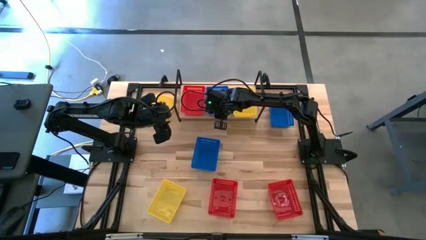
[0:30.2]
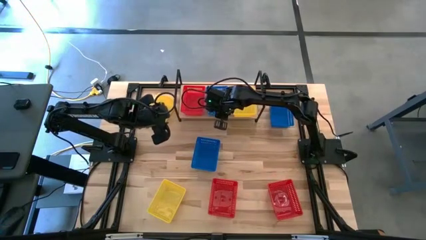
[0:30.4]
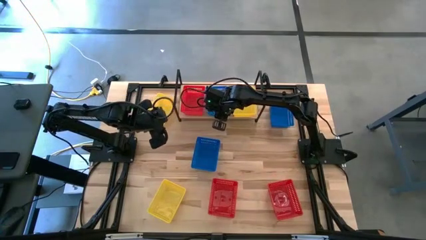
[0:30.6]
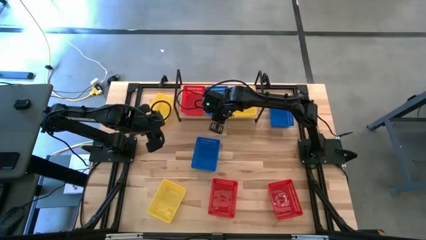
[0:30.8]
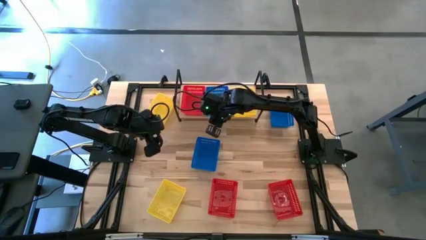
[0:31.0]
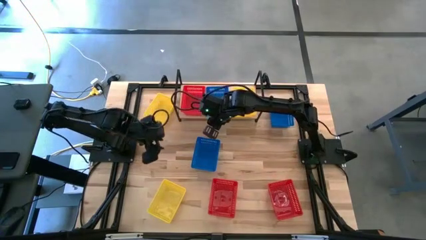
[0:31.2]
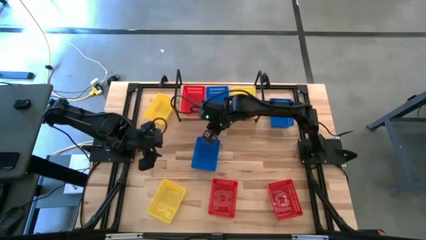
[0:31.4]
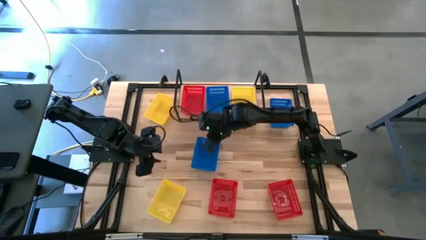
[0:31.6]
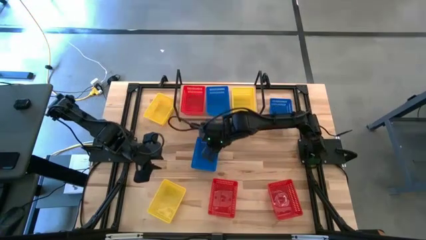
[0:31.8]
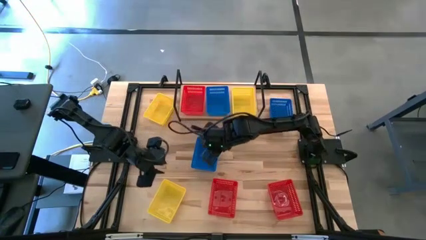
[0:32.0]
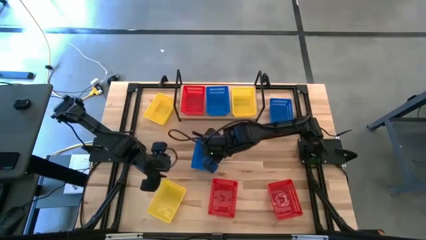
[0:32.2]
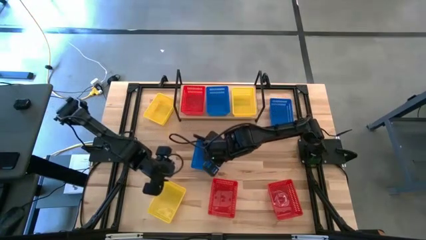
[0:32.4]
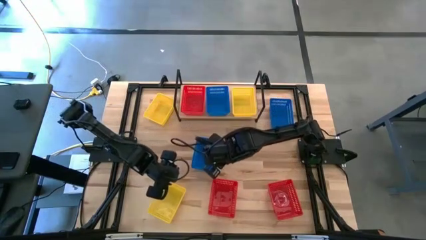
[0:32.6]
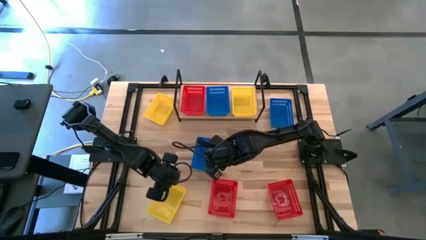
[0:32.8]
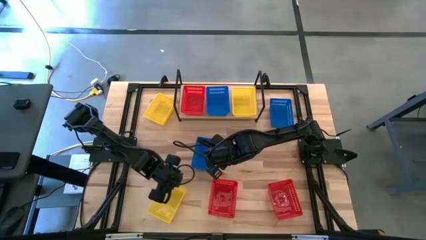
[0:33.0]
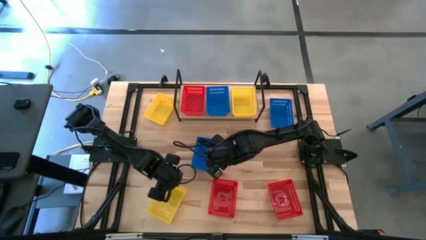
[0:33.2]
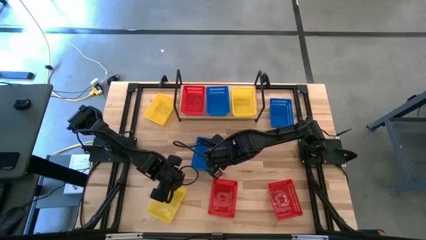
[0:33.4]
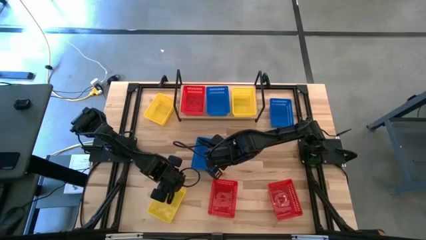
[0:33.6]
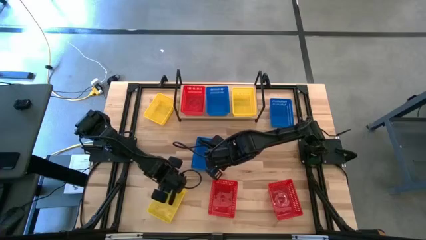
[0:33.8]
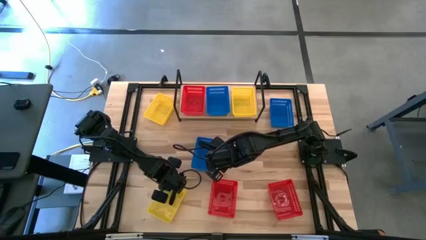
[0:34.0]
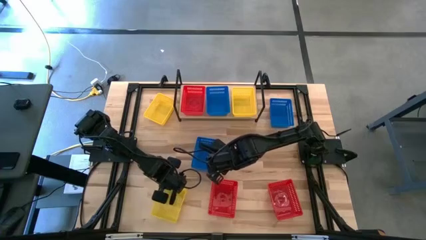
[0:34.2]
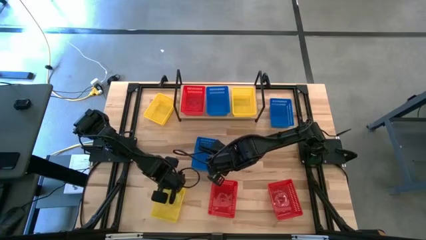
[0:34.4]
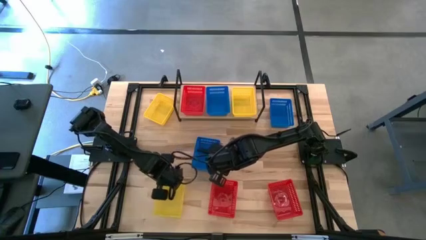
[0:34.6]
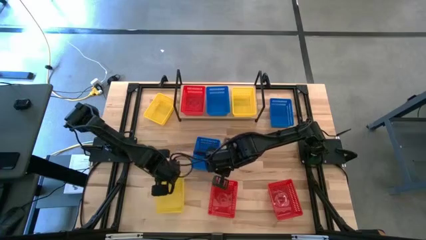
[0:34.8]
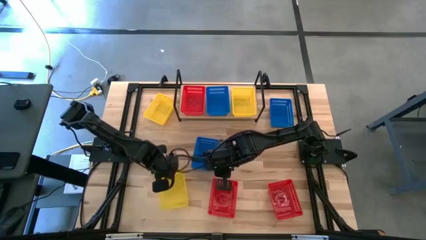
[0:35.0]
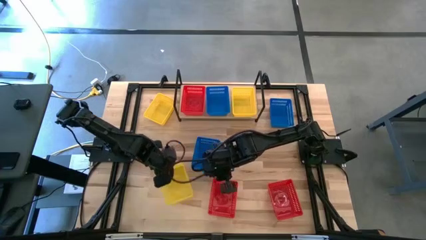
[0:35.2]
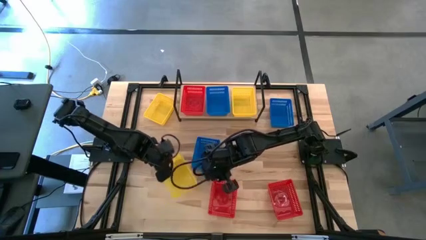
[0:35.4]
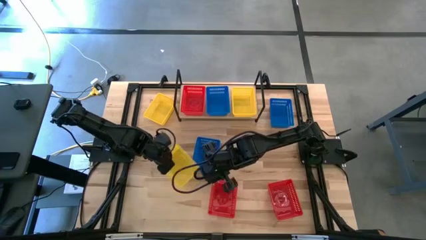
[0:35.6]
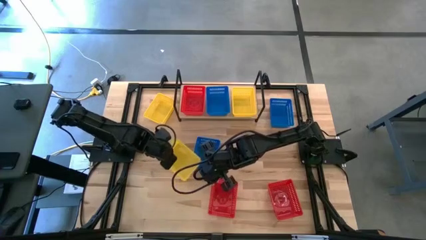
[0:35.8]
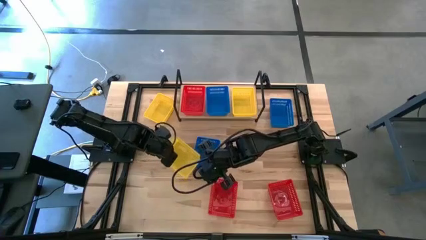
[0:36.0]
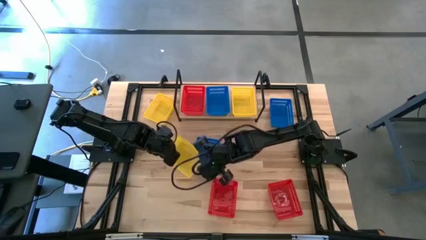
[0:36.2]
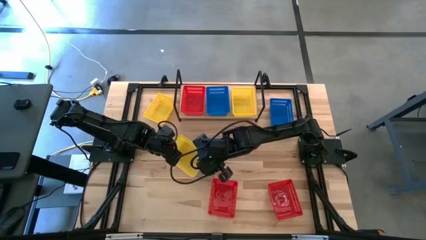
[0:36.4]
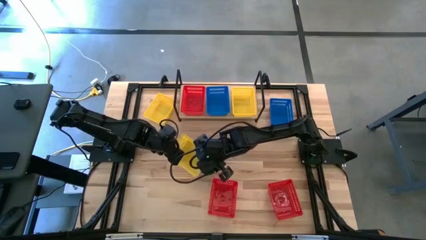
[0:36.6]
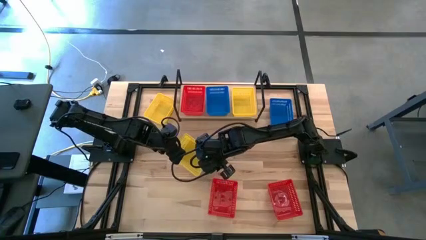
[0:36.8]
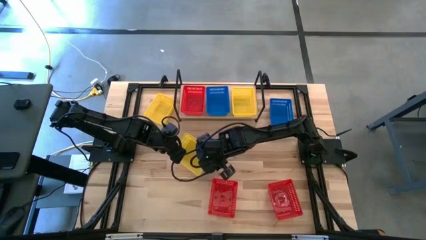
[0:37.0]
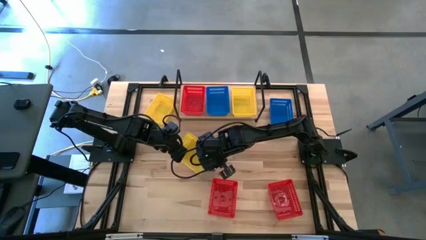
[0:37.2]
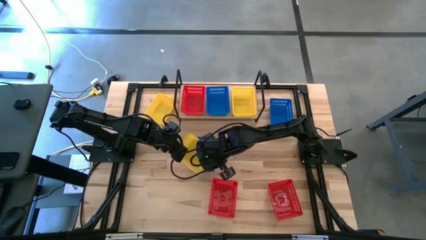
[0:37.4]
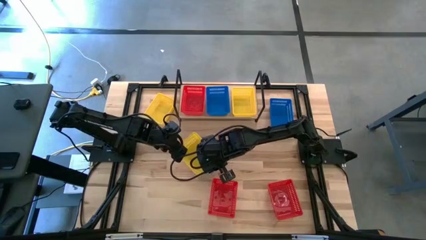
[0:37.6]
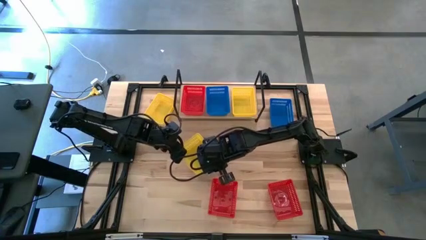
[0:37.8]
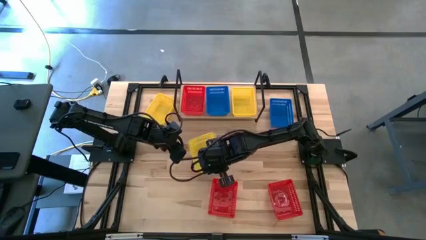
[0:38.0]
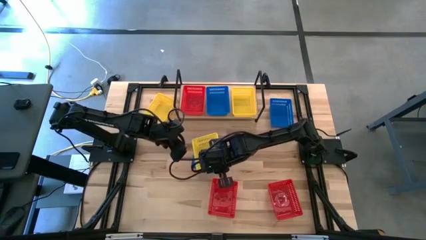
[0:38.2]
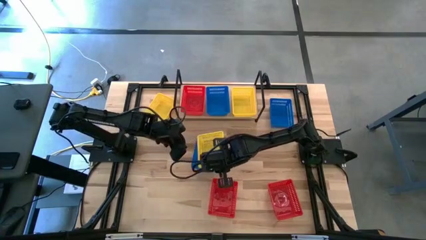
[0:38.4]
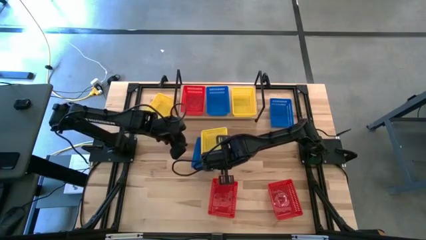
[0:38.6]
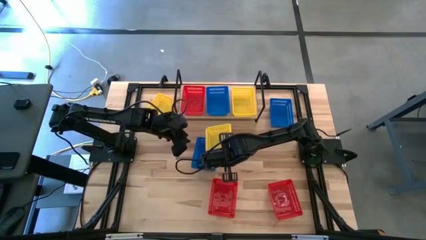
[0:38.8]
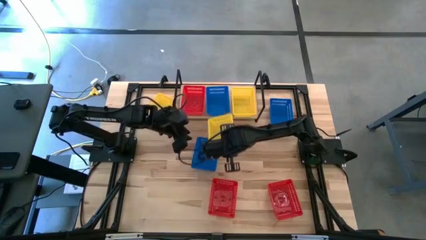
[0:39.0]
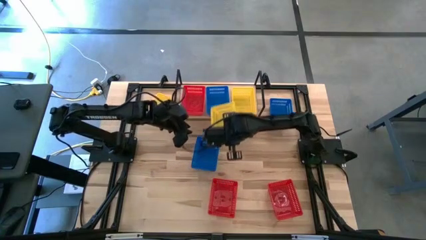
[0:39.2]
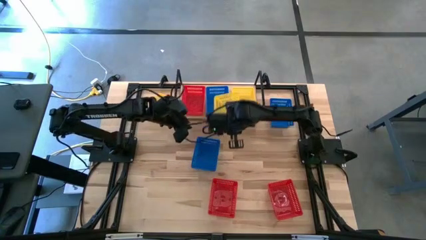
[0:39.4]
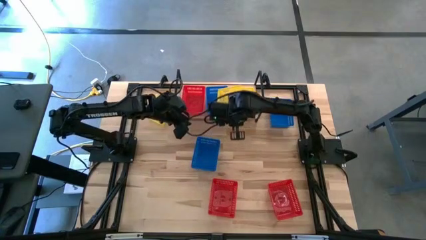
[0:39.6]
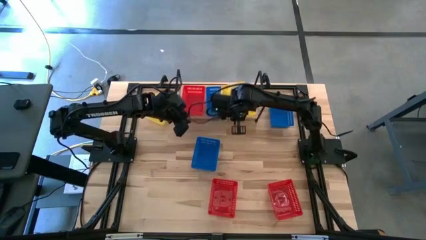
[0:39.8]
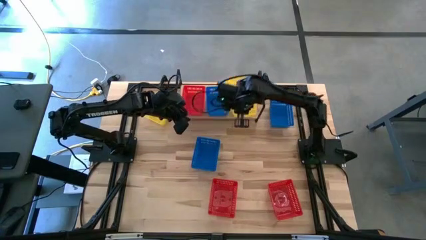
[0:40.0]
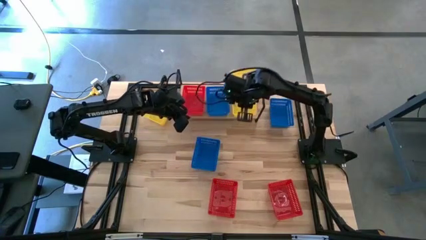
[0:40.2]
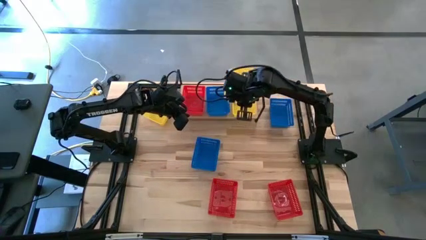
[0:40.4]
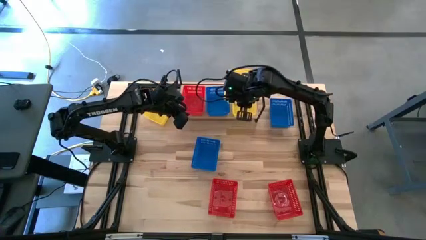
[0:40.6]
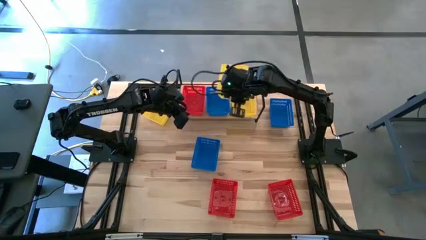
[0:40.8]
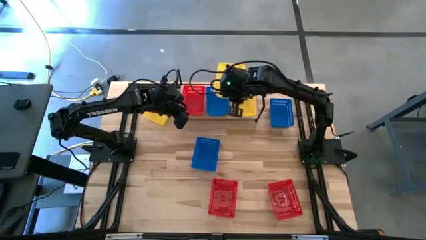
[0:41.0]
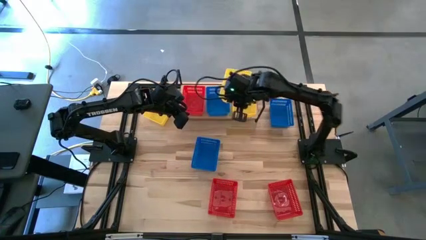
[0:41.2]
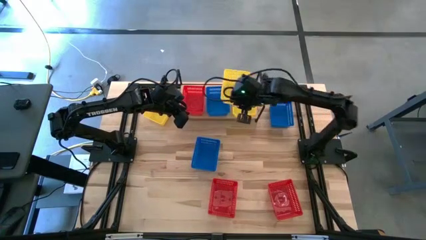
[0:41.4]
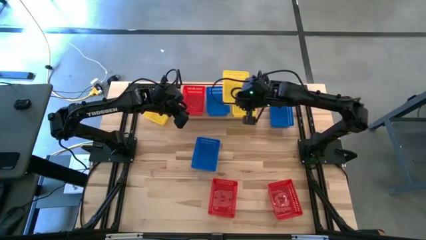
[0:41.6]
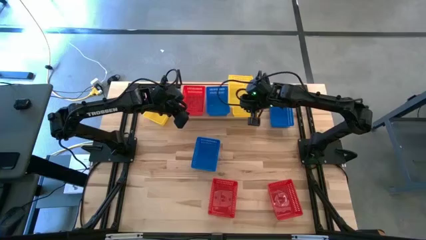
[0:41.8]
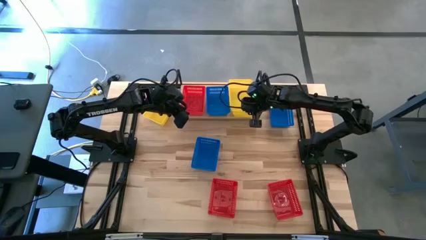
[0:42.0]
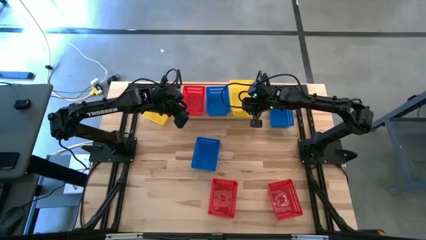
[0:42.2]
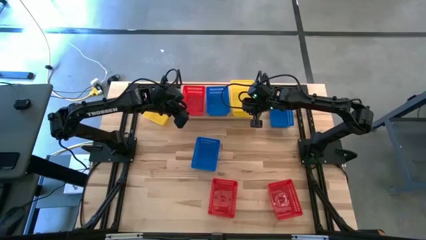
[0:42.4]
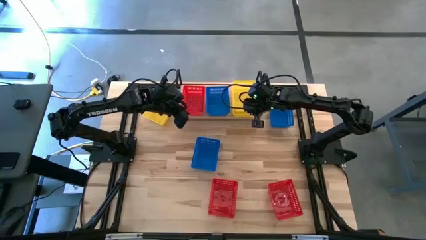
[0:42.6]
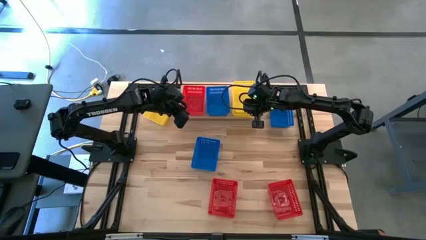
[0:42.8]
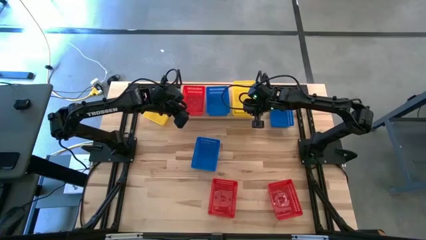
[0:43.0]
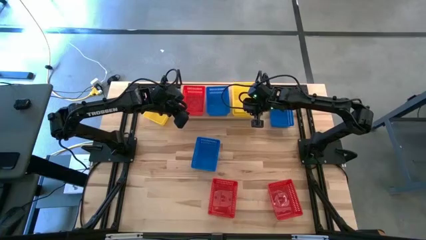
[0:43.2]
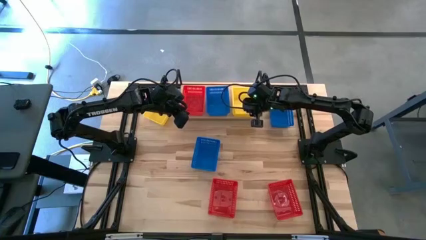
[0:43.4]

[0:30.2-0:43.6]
Task: Stack baskets on shelf by color
Stack the bottom yellow bin on top of the yellow bin on the shelf
